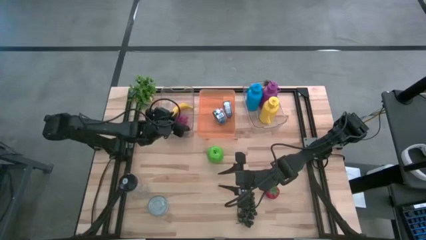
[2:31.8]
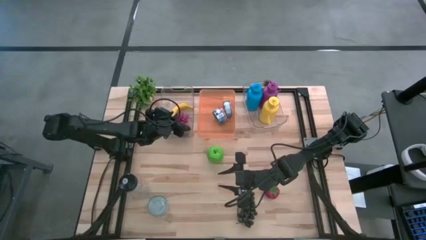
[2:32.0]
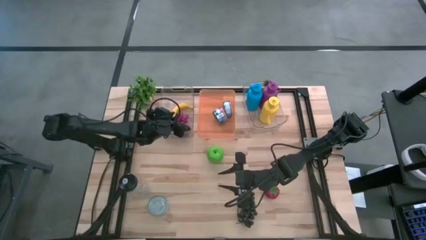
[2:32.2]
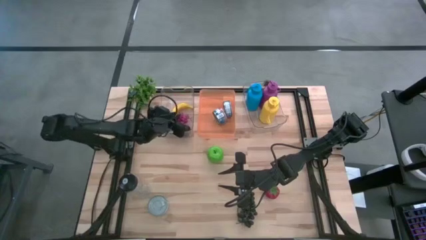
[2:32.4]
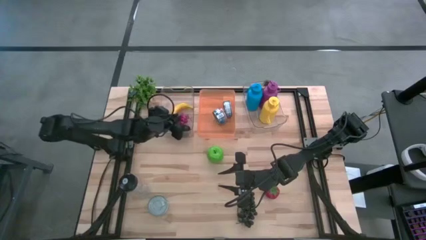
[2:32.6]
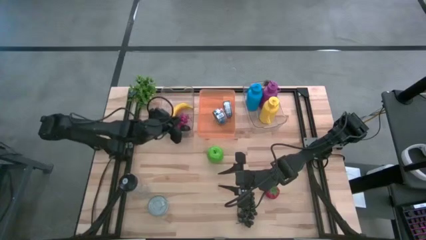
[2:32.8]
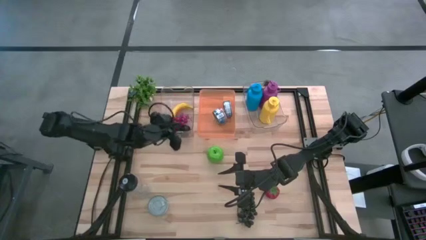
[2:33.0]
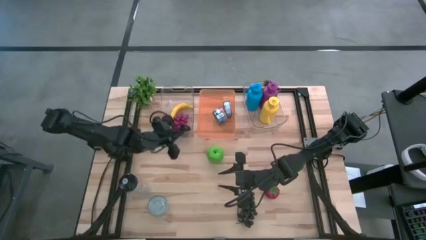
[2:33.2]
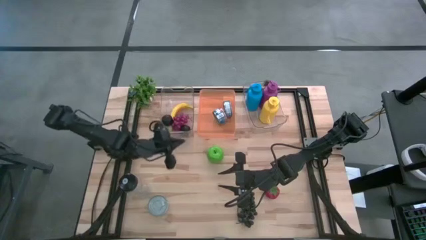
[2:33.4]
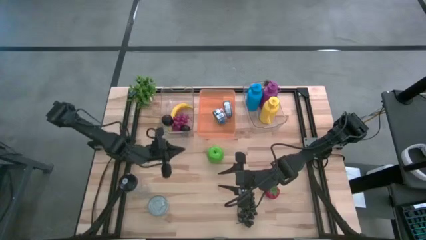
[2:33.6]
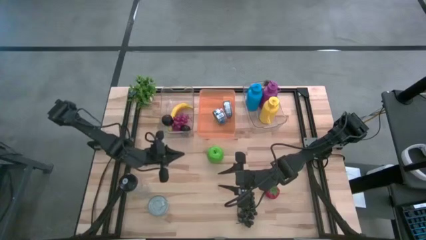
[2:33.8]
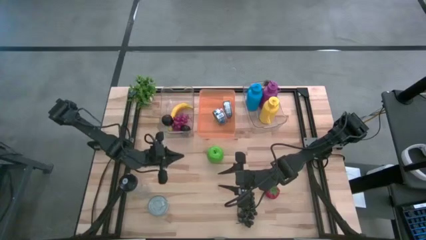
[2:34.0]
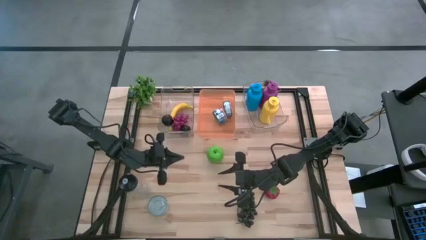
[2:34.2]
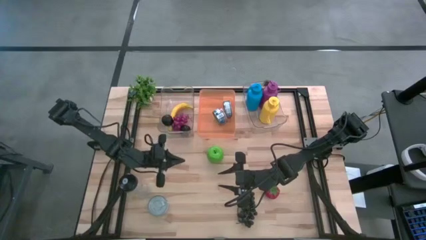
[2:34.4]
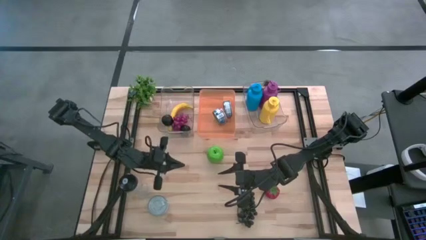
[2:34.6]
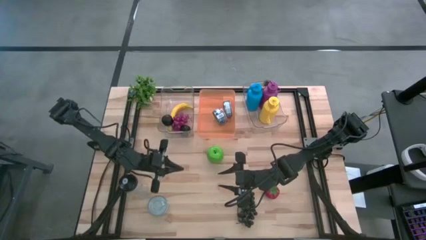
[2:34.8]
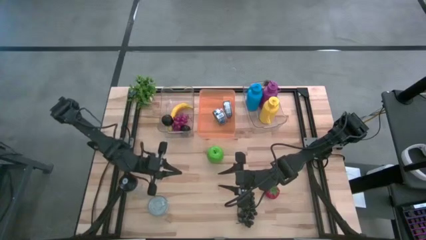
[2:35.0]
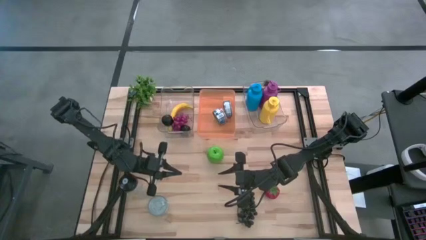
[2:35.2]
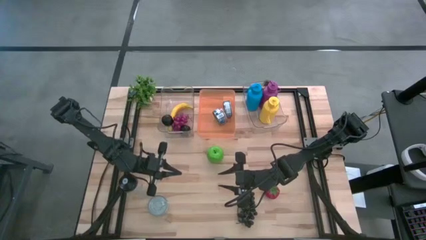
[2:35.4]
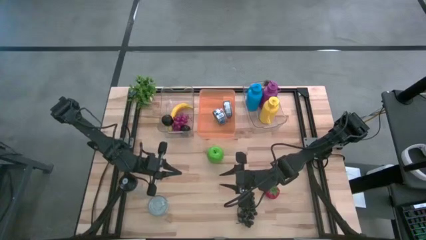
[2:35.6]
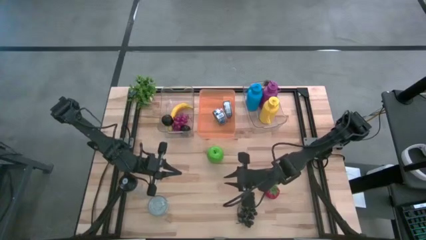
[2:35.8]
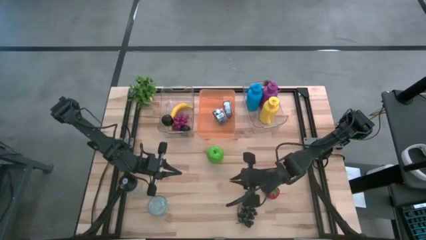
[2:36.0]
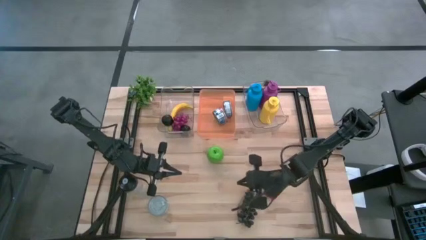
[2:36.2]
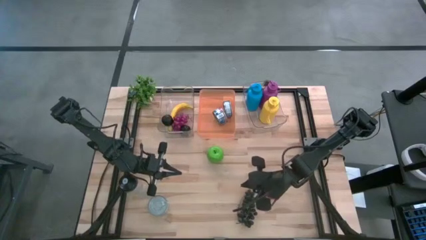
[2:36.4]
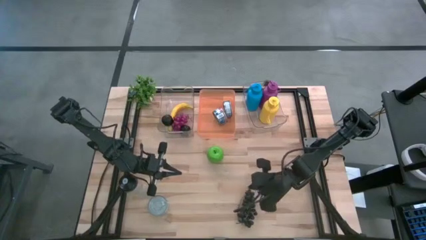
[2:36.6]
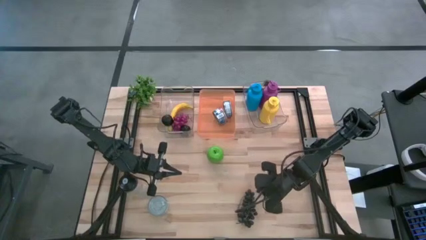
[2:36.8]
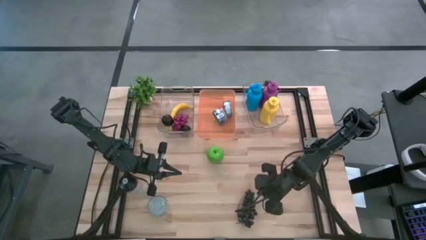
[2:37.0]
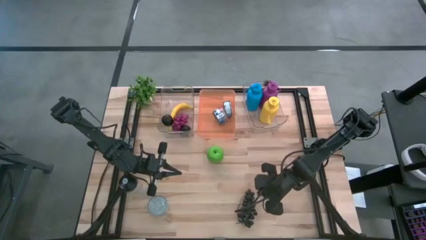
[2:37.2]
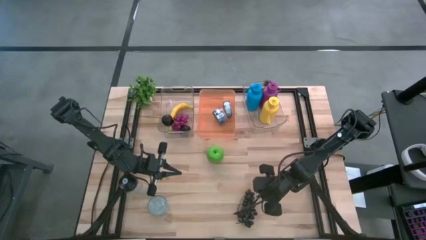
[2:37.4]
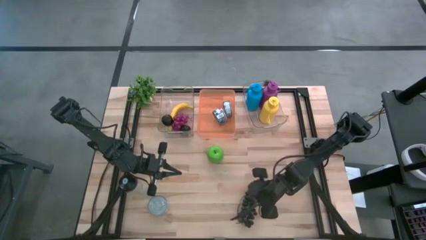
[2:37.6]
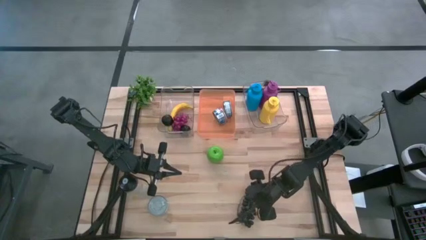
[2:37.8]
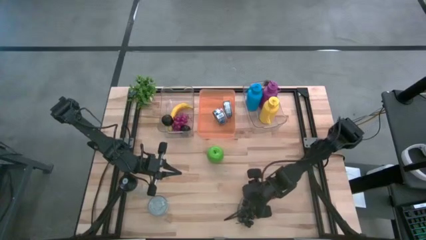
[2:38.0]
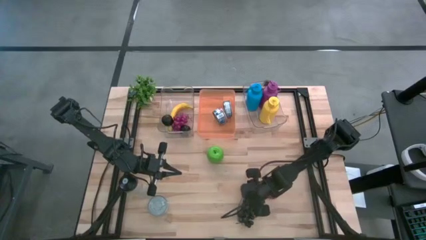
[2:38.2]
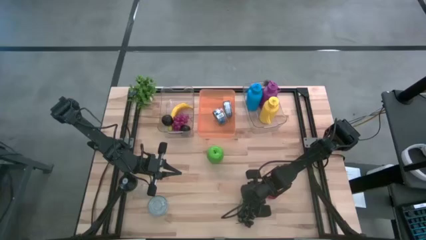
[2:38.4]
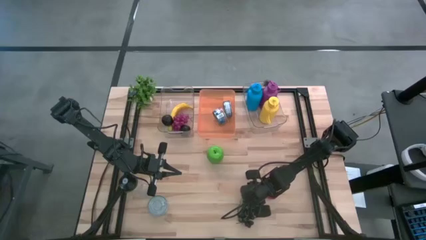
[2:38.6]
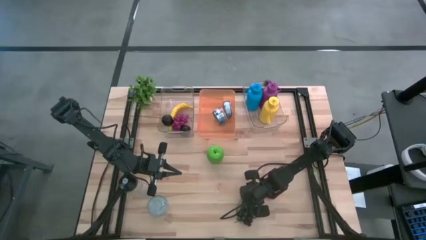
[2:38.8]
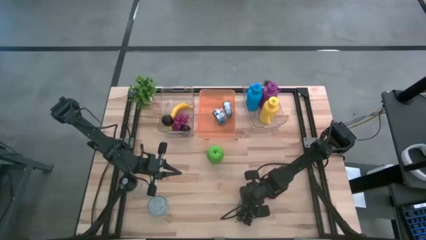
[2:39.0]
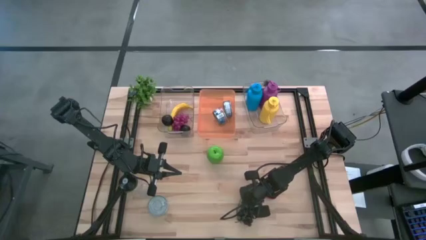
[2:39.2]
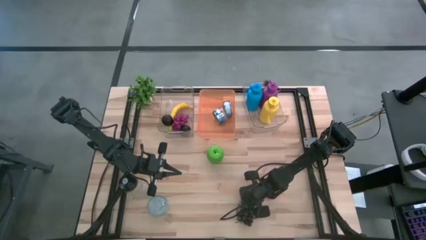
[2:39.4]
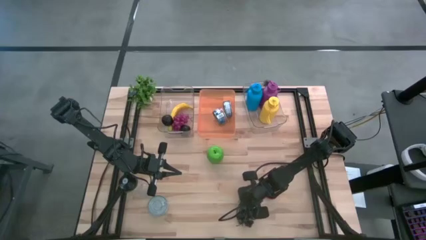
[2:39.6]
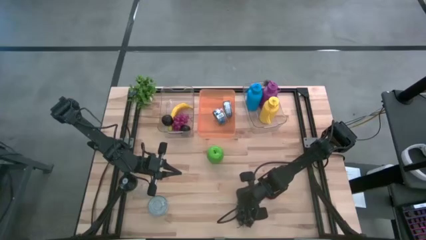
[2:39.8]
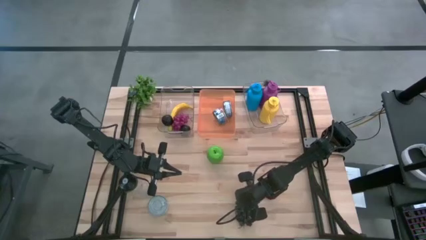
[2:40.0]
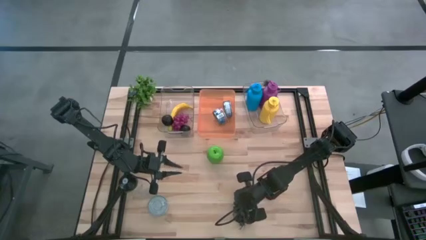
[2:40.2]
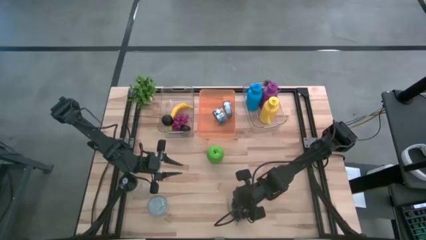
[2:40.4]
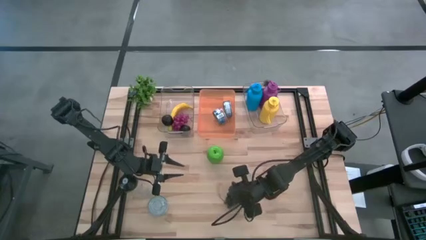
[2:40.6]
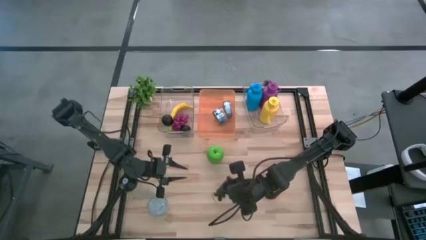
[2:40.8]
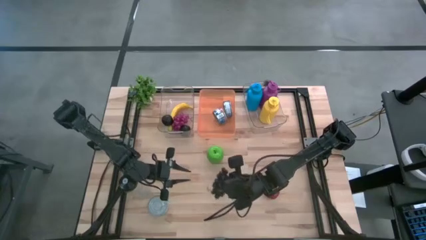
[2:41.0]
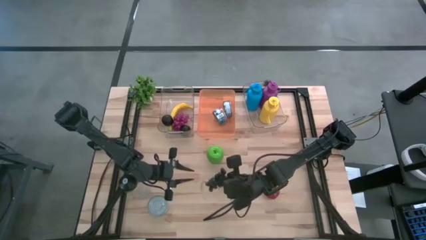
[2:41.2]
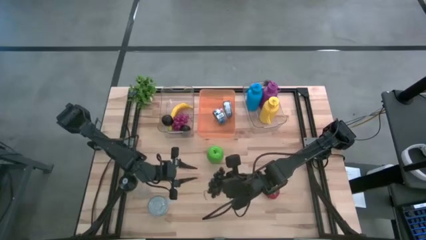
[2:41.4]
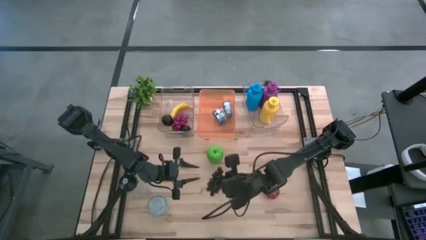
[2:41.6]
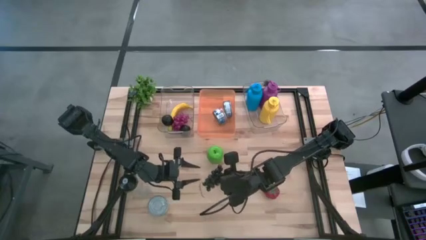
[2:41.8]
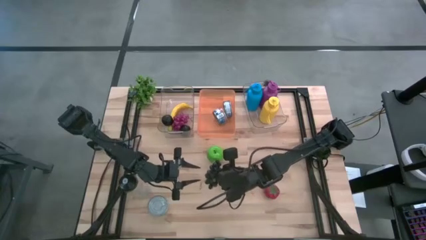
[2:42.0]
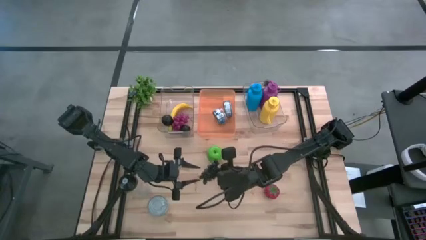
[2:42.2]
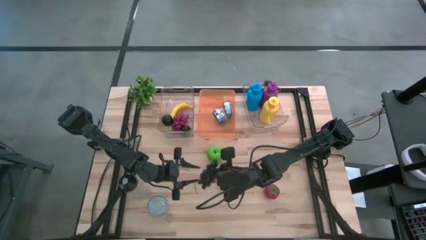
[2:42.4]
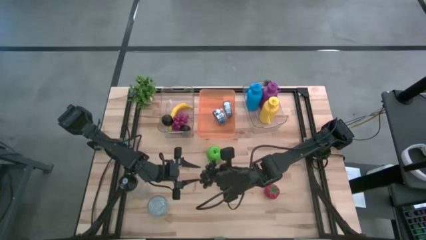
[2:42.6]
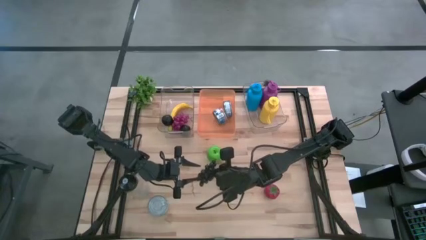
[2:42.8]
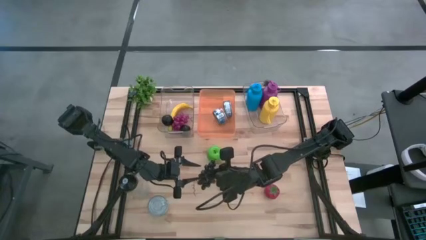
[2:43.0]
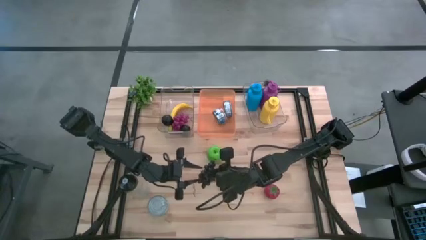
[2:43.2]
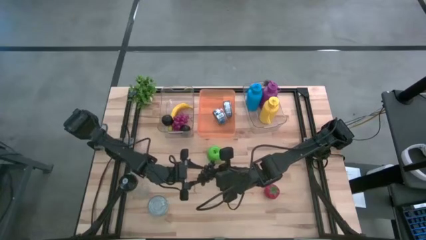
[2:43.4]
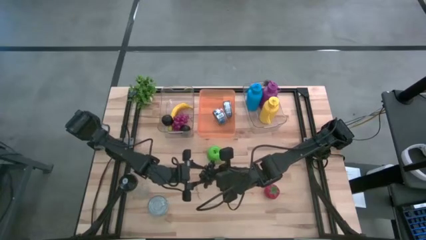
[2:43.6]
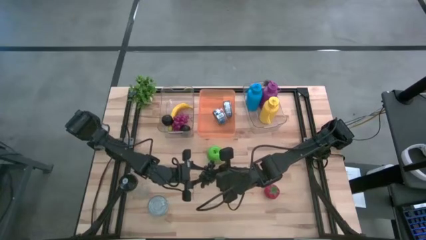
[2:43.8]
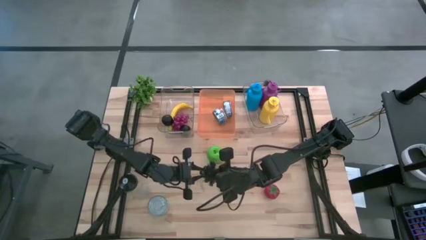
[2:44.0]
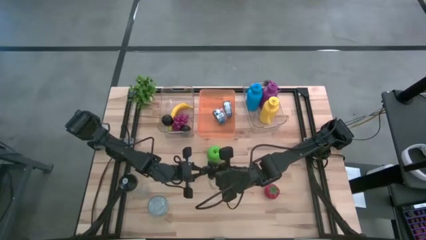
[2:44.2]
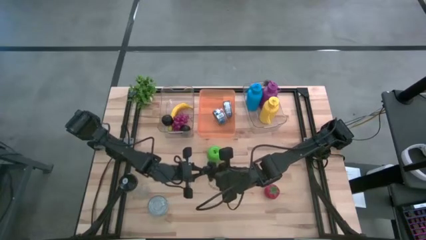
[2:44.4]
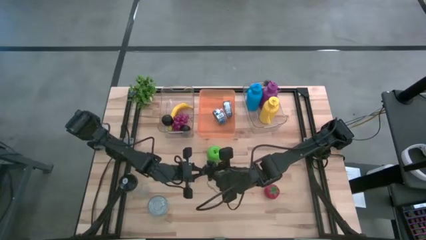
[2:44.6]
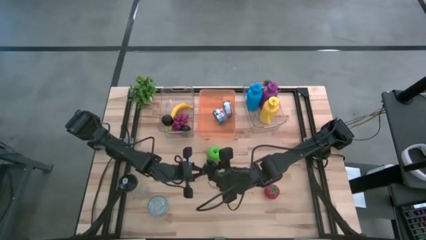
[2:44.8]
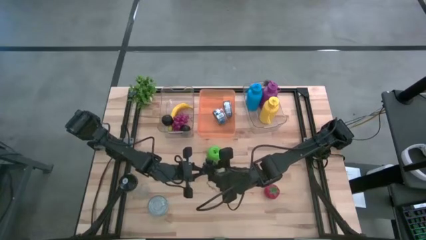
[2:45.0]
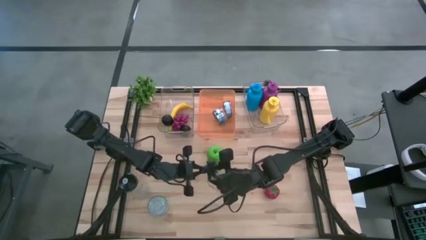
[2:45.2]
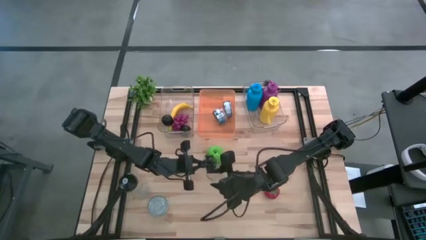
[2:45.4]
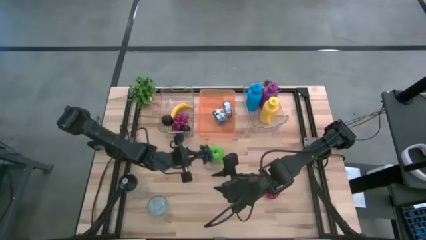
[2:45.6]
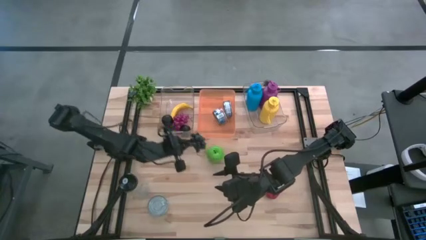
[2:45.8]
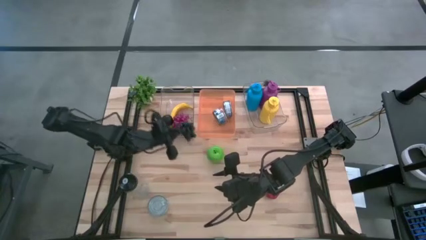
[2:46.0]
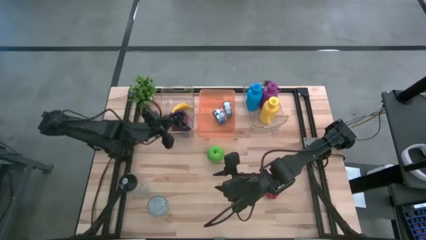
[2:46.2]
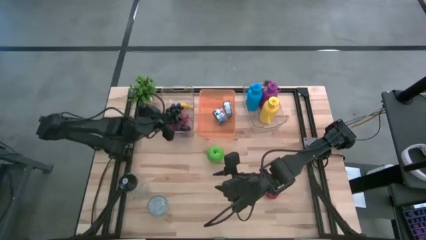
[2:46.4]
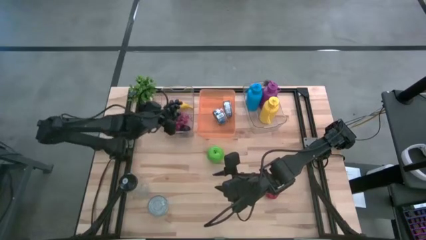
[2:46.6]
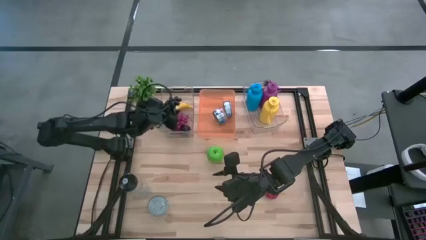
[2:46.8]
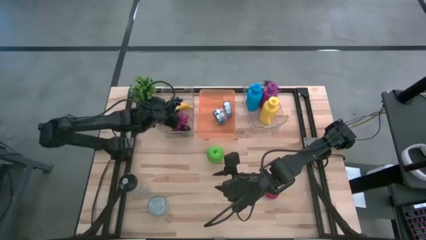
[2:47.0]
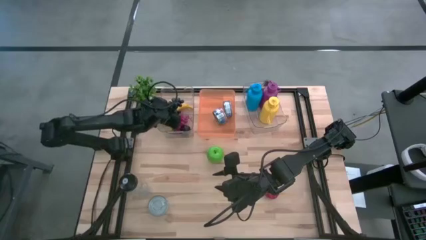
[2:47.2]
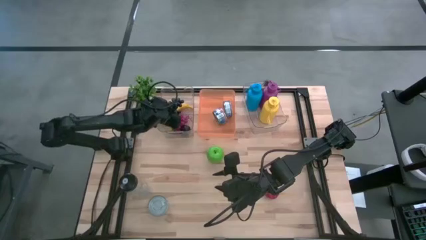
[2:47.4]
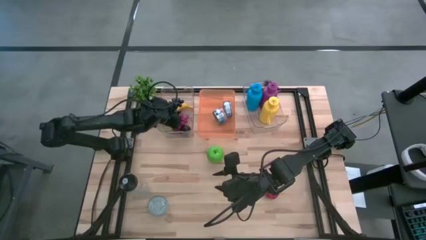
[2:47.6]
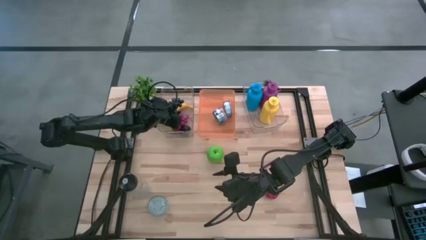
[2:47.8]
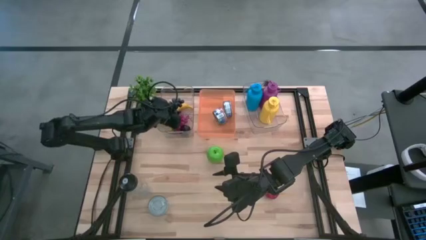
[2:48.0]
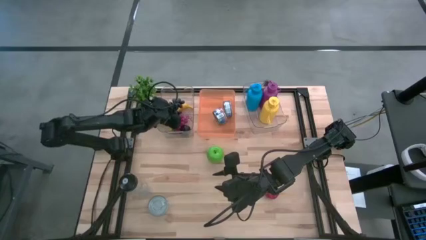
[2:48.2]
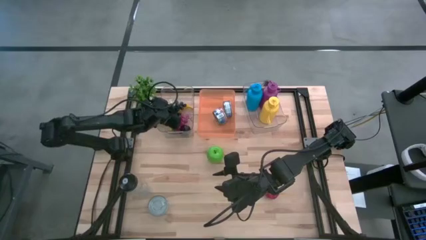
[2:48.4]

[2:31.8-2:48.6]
Task: Pick & Place Food Item
Put the black grapes into the left transparent bin
